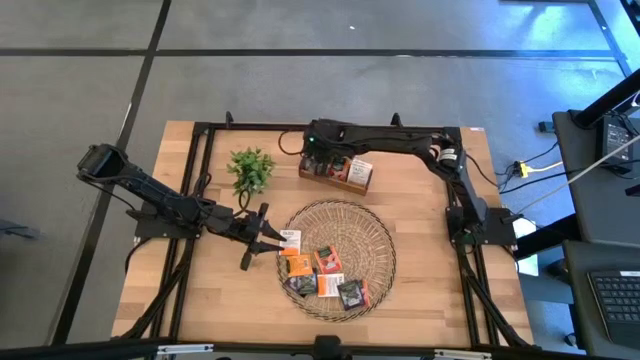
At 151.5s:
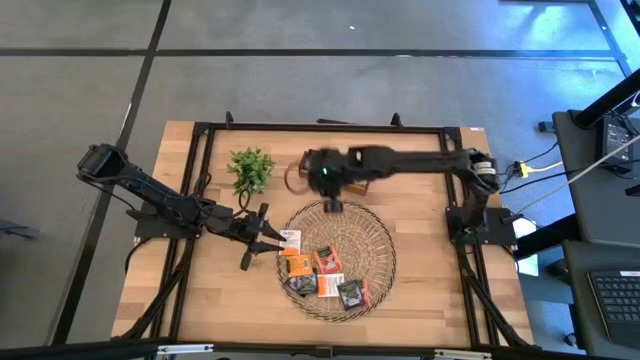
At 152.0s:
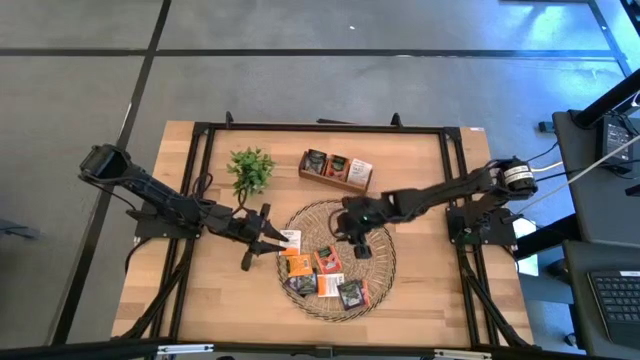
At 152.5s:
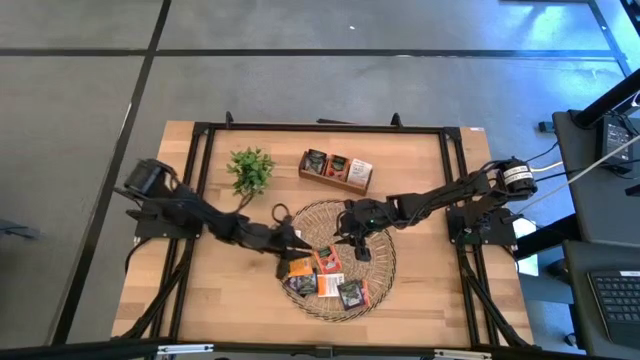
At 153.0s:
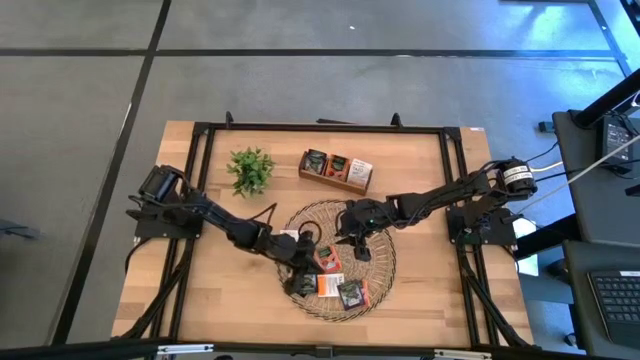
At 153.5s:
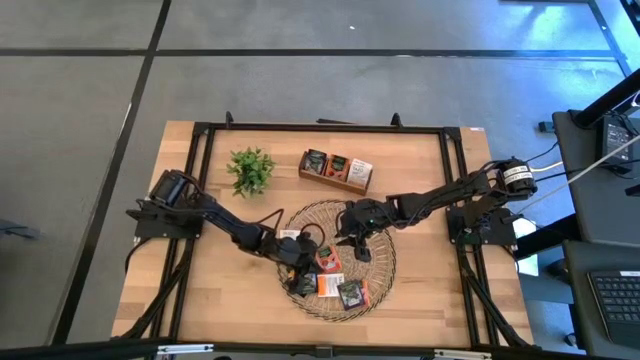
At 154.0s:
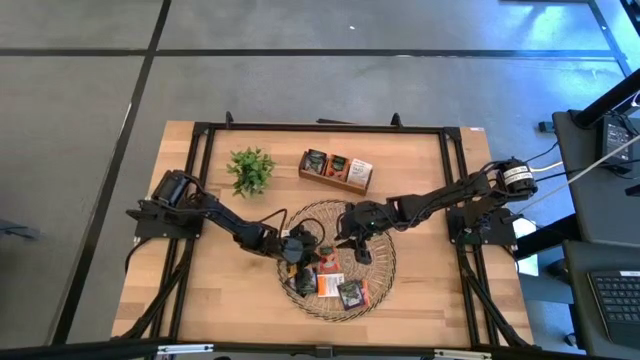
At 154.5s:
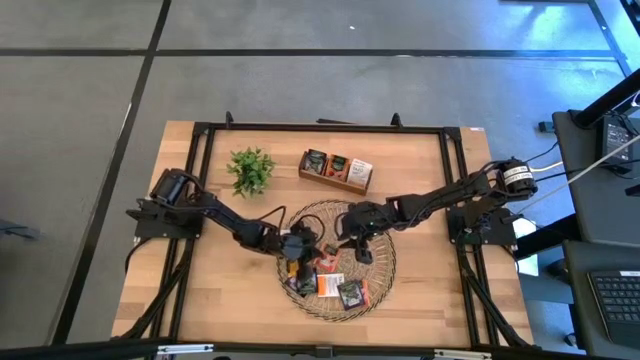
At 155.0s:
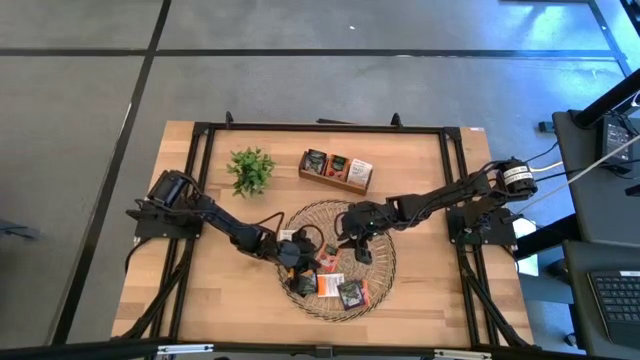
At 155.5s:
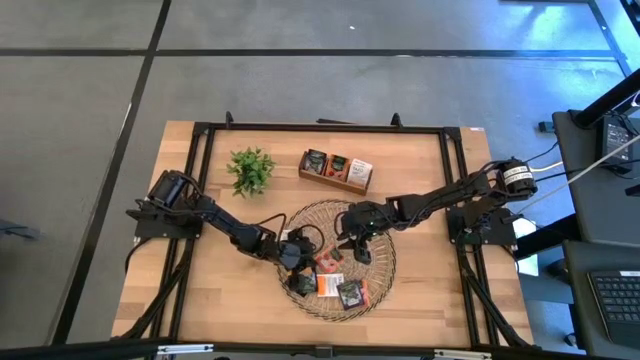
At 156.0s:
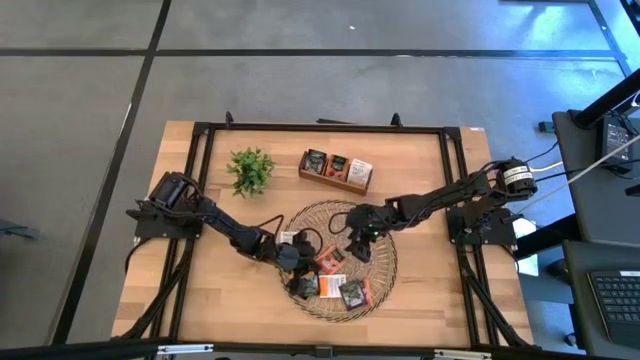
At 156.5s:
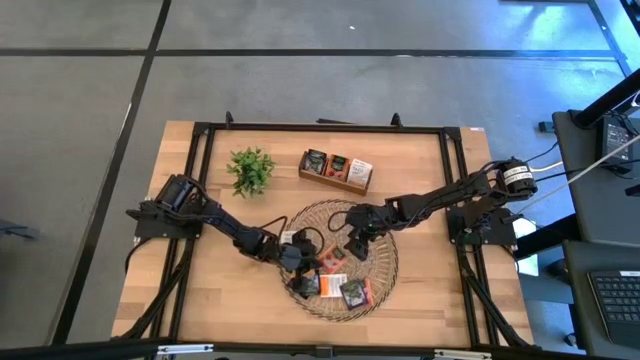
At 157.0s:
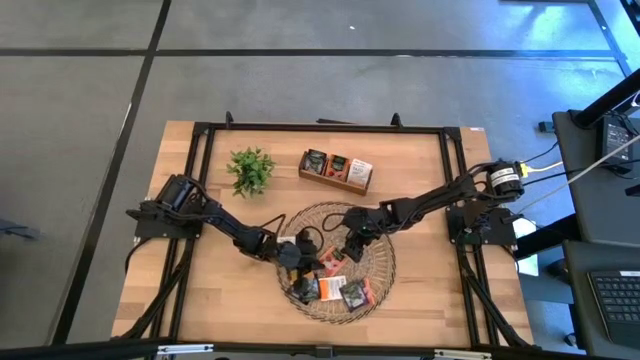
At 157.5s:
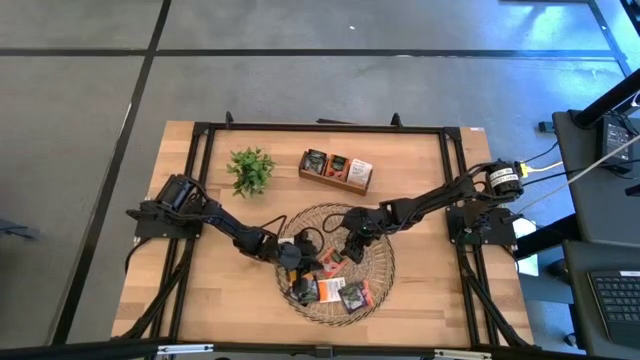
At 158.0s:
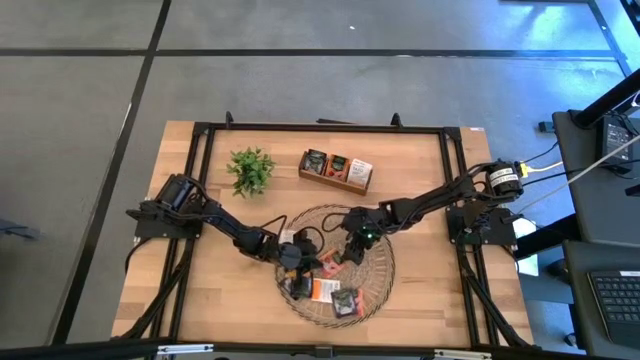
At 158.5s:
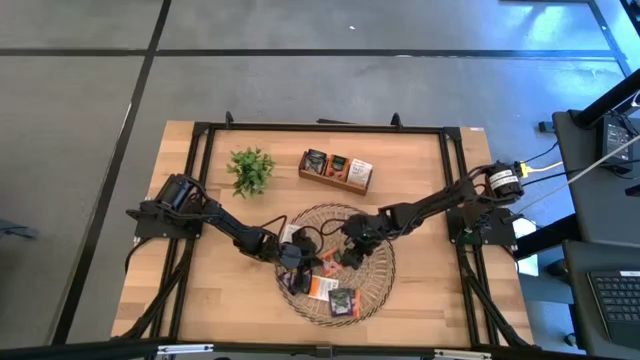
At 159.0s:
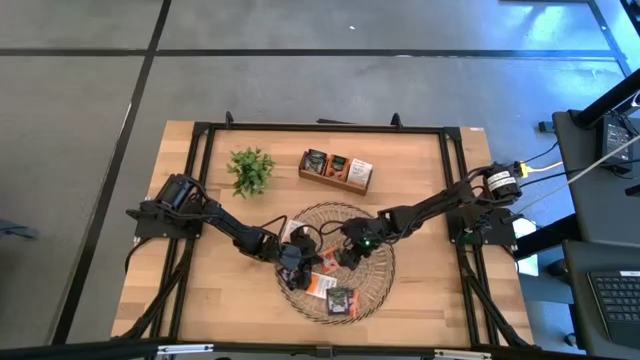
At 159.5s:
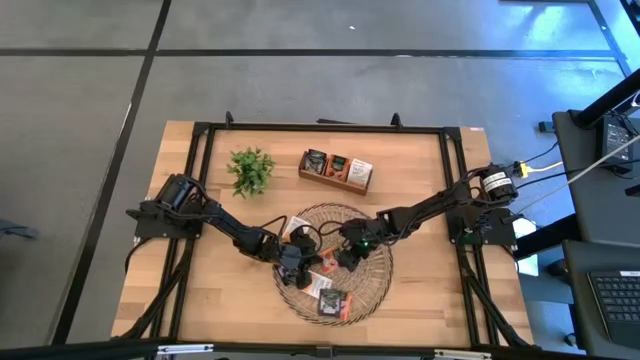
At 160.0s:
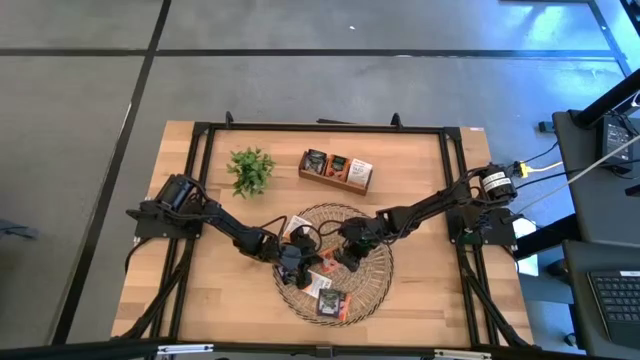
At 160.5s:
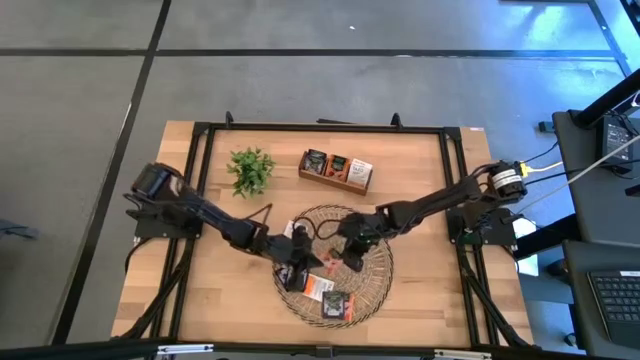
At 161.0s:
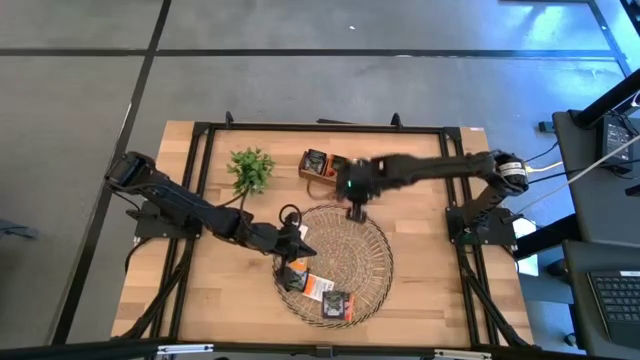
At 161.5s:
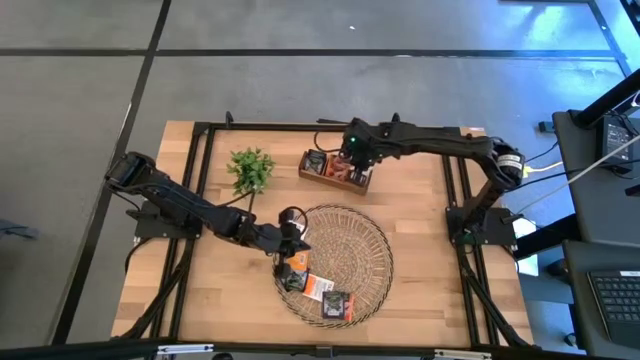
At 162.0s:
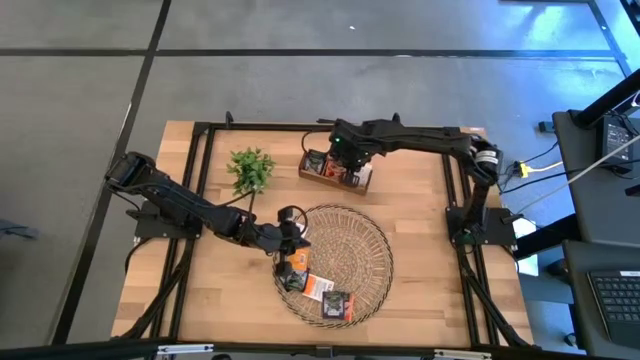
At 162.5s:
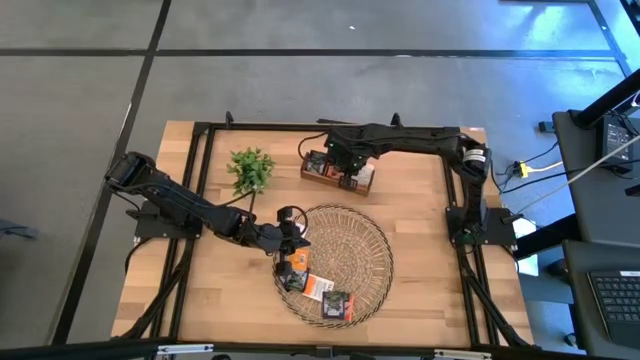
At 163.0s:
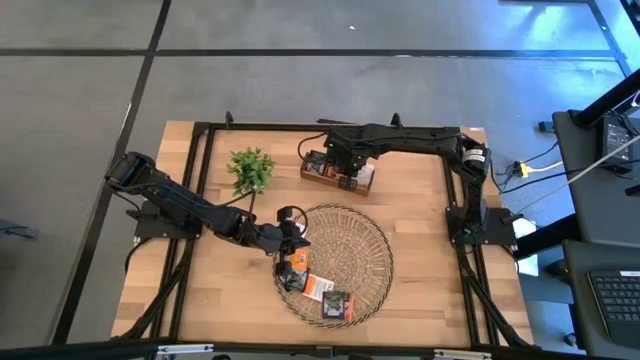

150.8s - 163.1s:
Task: Pick & Place Tea
Put the orange tea bag into the middle section of the wooden organizer

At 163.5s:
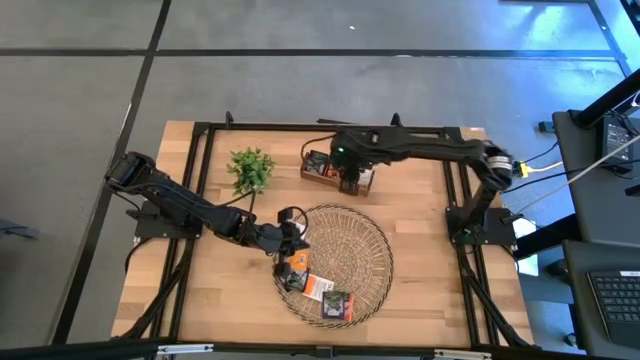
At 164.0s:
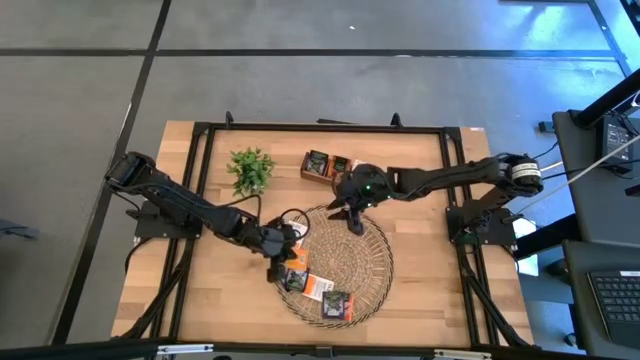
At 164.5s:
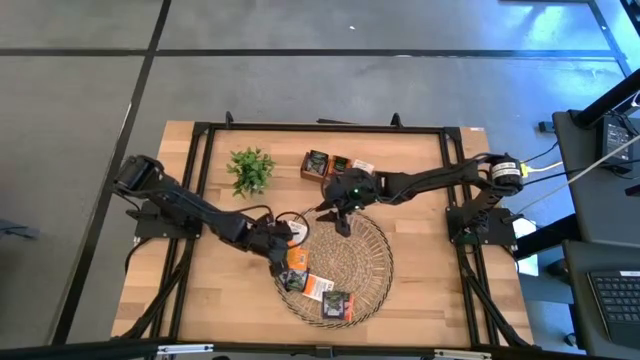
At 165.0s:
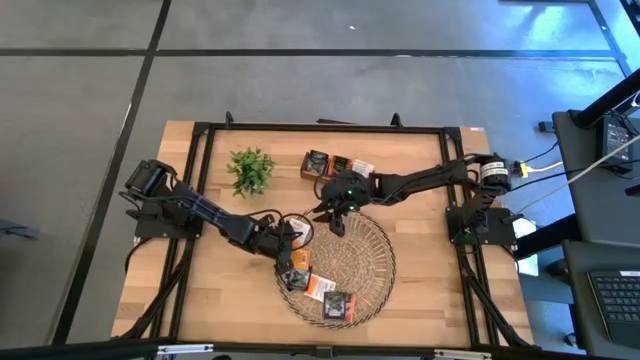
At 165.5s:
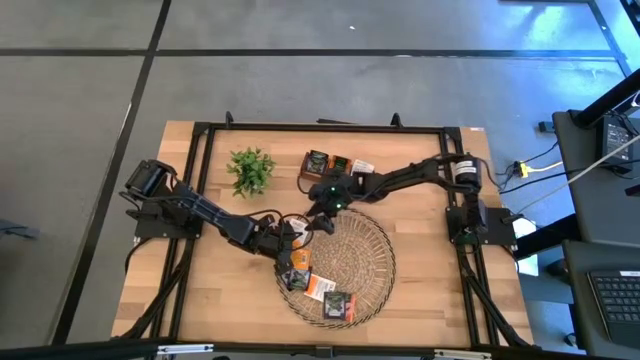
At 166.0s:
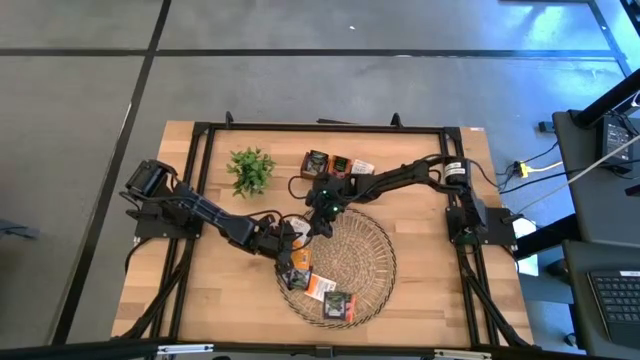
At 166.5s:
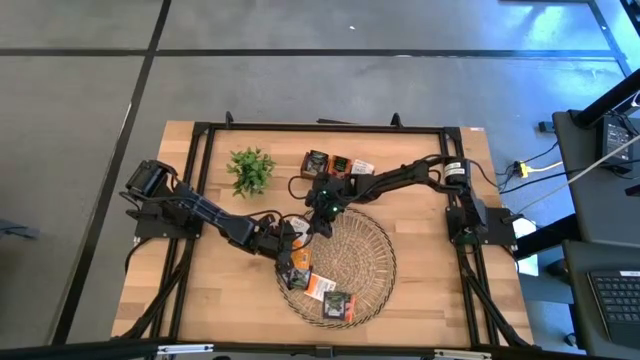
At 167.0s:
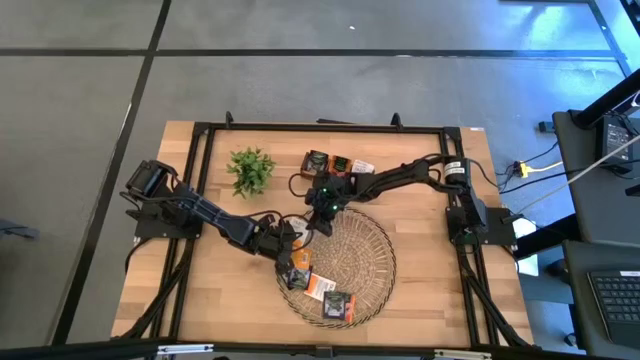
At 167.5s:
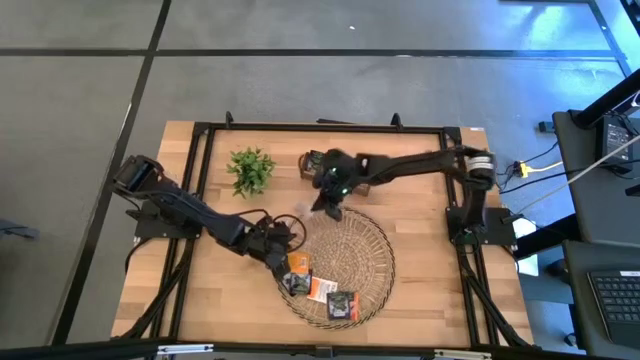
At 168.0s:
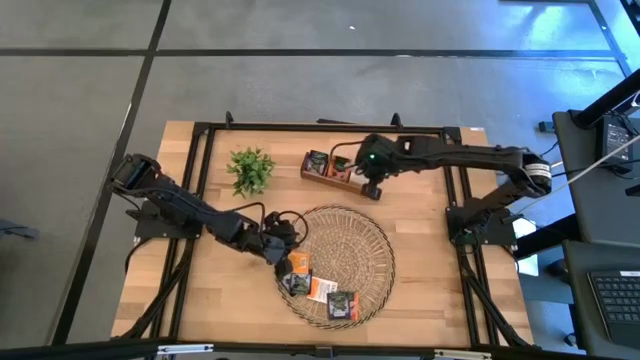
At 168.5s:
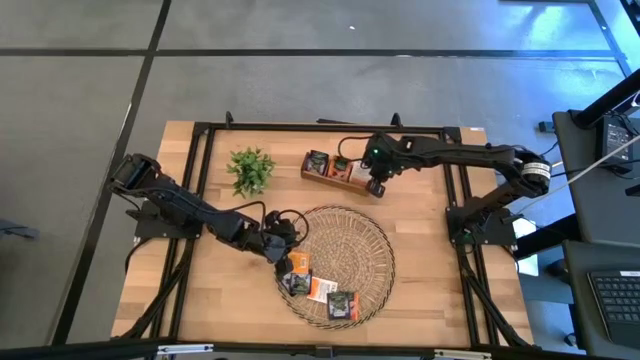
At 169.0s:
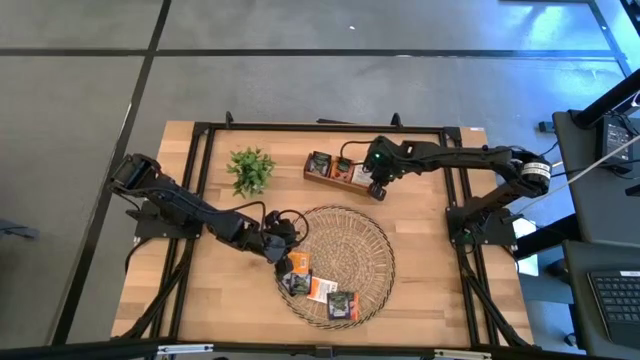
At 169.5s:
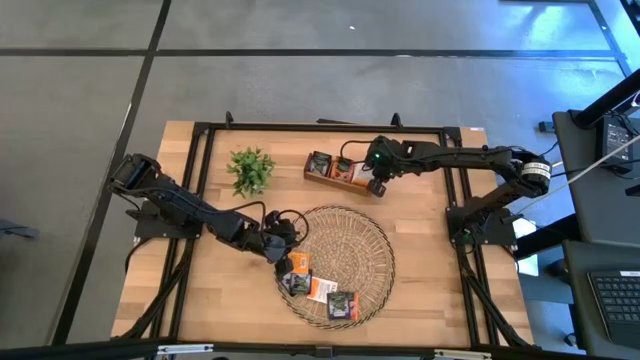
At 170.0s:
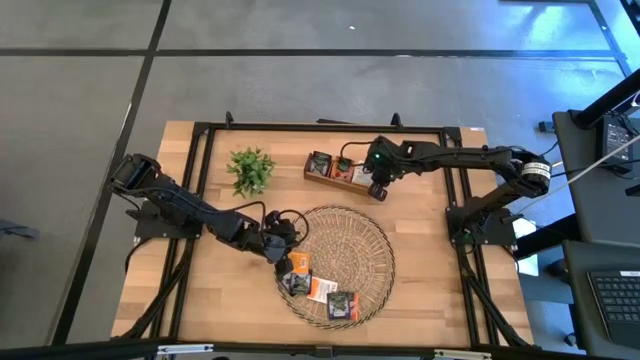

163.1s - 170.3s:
Put the white and orange tea bag into the right section of the wooden organizer

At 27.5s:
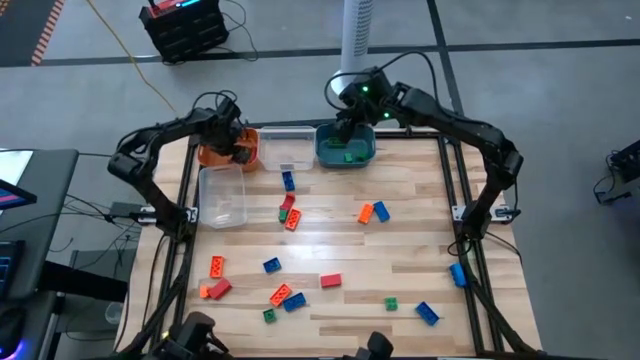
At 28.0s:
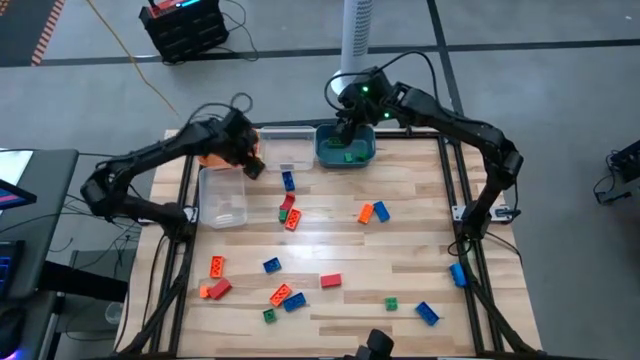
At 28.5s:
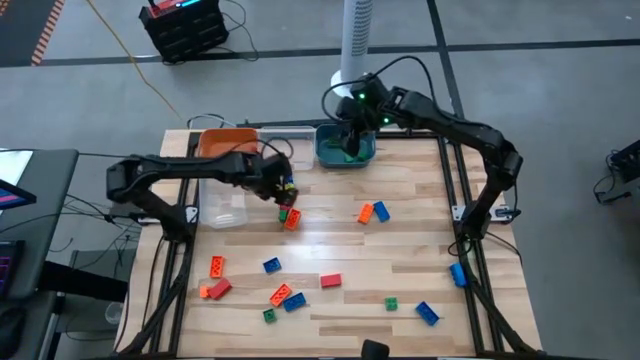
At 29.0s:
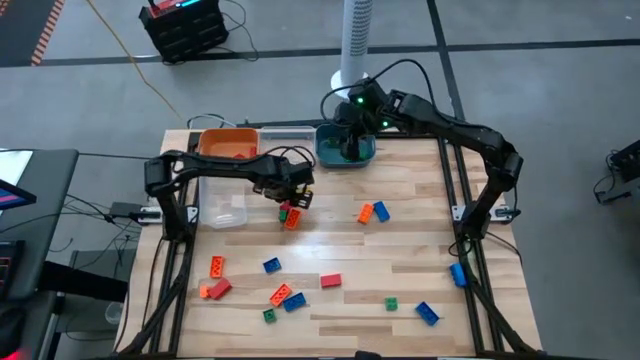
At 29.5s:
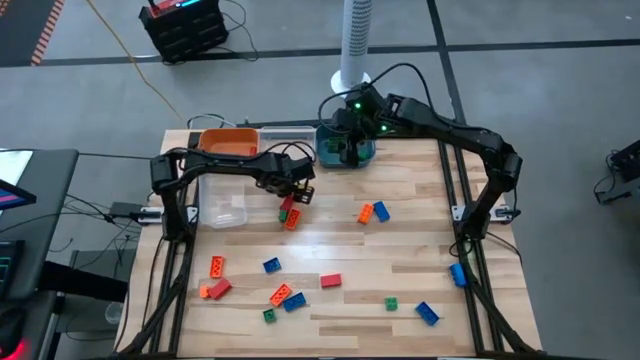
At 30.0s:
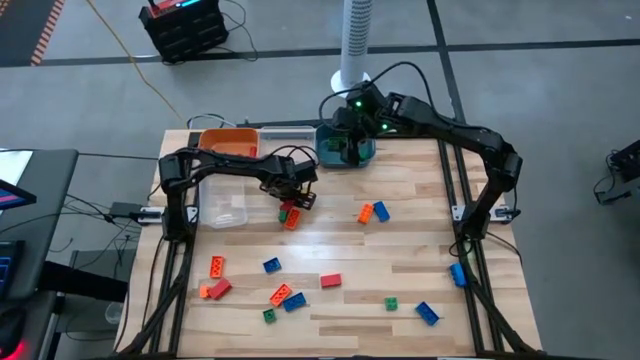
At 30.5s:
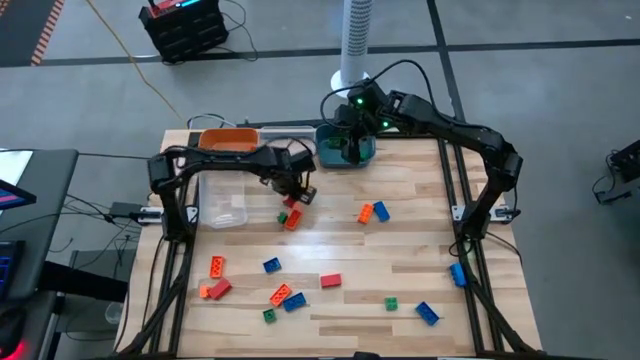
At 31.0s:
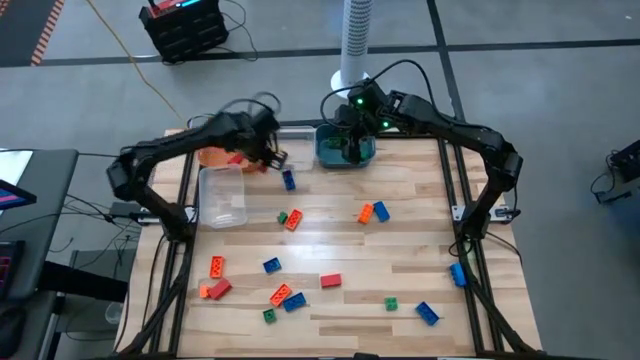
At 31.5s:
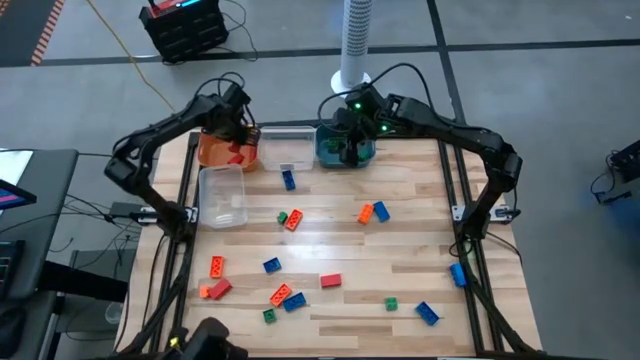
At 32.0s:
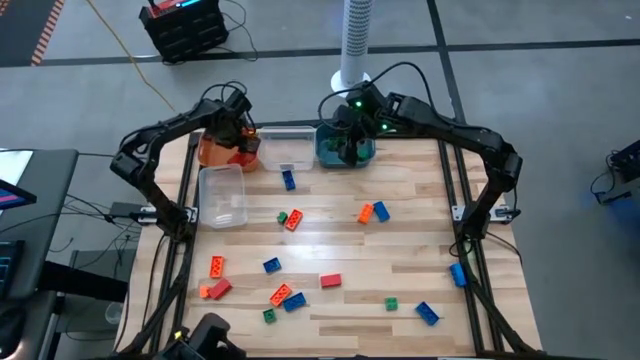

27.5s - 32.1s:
Task: Sort blocks
Put the red block into the orange bin
